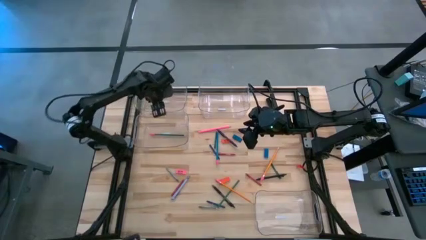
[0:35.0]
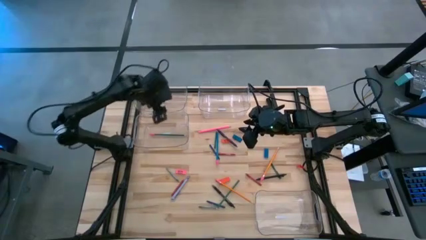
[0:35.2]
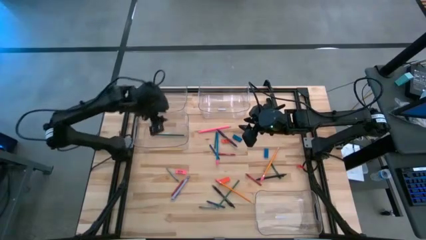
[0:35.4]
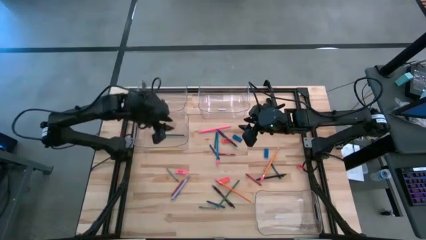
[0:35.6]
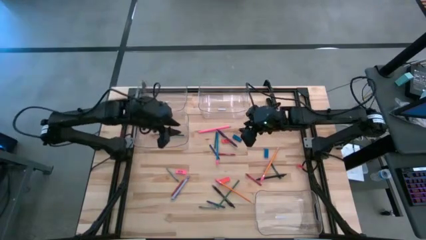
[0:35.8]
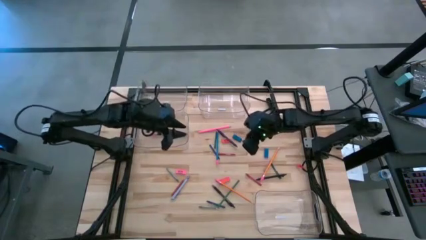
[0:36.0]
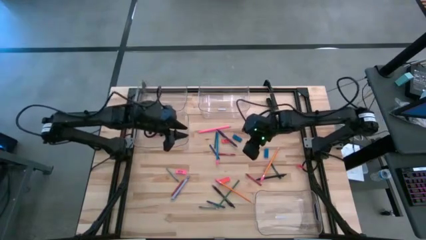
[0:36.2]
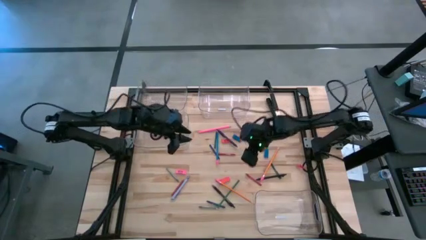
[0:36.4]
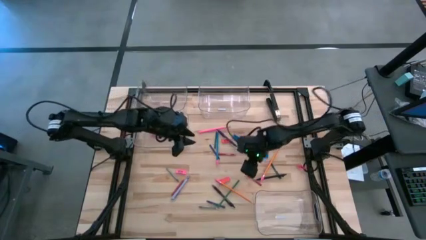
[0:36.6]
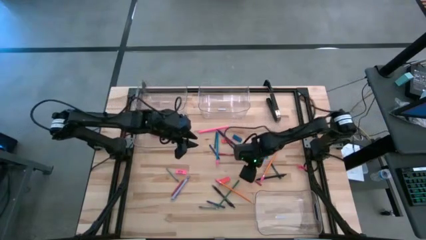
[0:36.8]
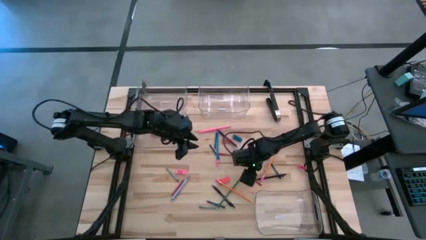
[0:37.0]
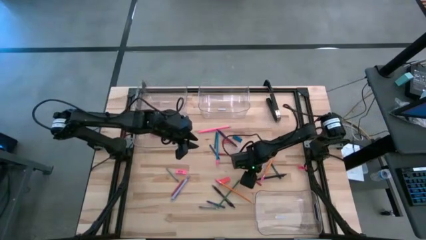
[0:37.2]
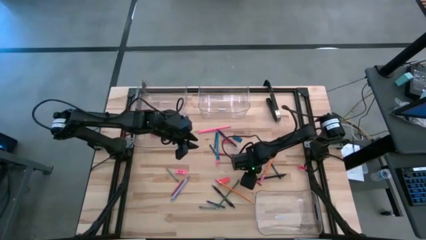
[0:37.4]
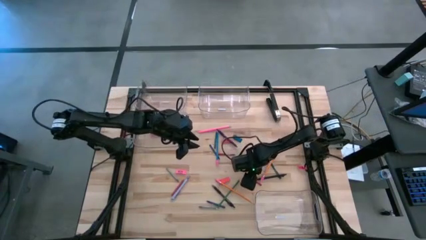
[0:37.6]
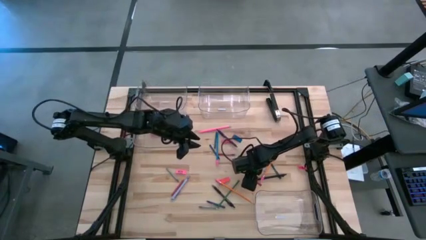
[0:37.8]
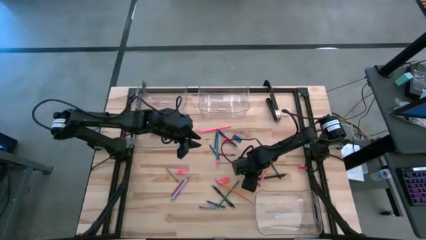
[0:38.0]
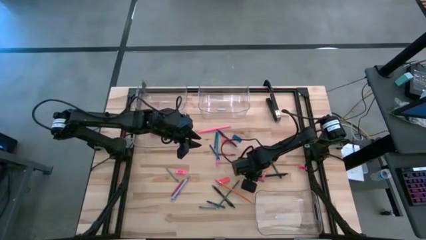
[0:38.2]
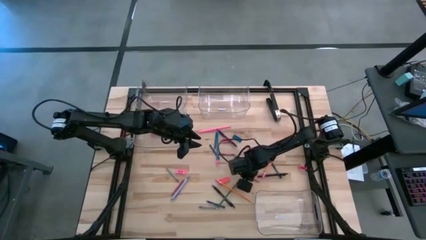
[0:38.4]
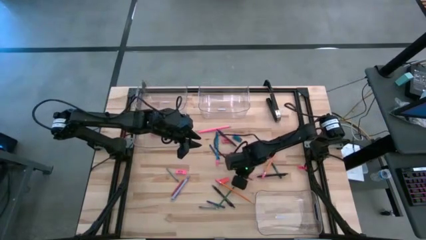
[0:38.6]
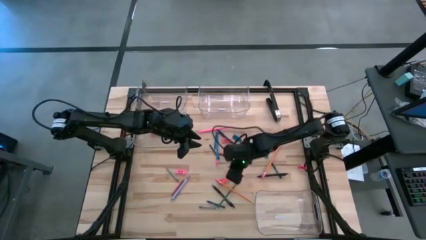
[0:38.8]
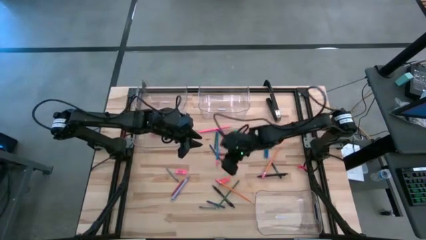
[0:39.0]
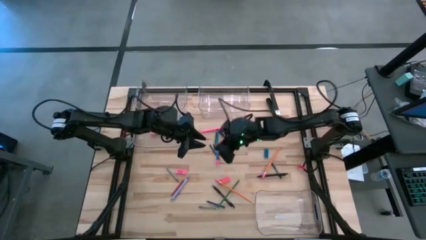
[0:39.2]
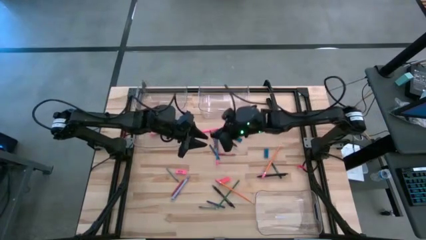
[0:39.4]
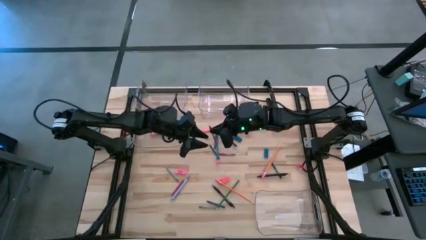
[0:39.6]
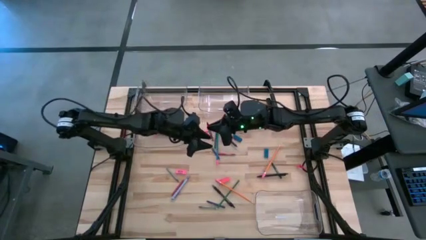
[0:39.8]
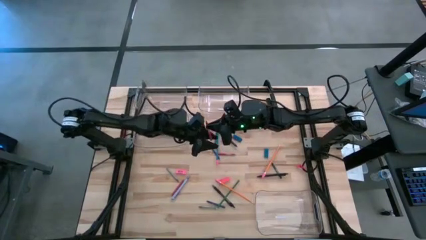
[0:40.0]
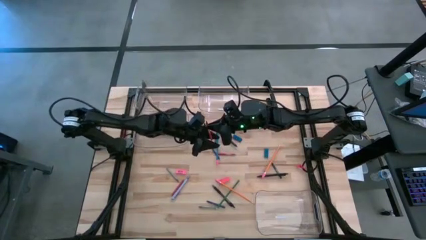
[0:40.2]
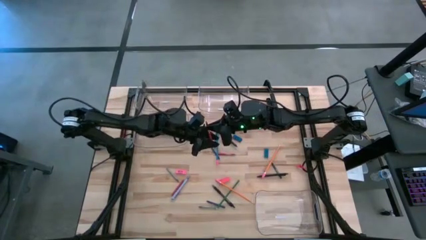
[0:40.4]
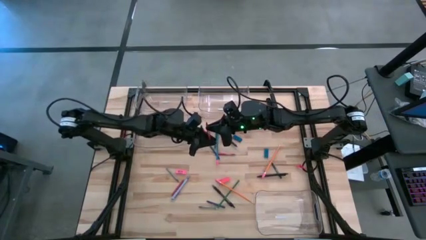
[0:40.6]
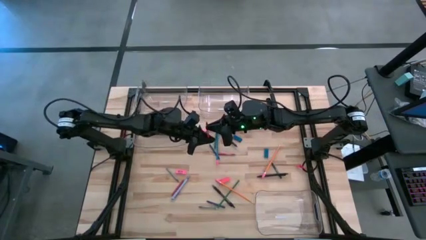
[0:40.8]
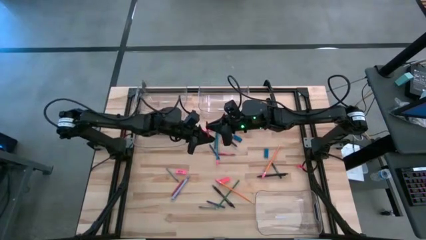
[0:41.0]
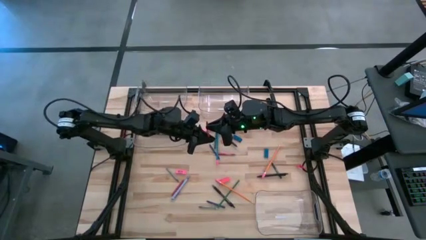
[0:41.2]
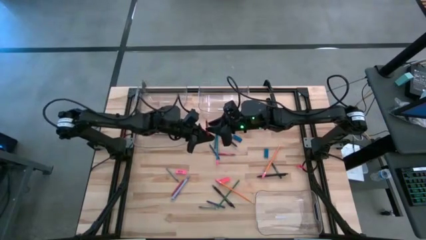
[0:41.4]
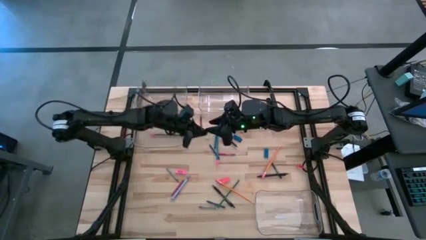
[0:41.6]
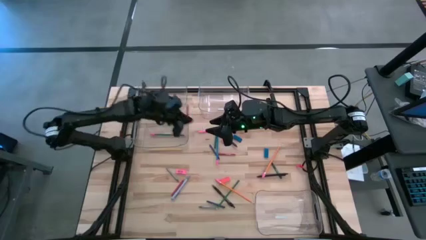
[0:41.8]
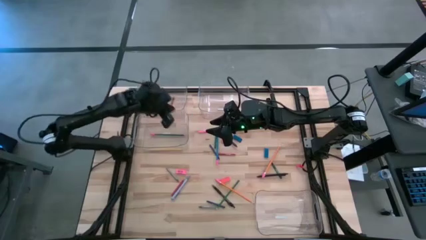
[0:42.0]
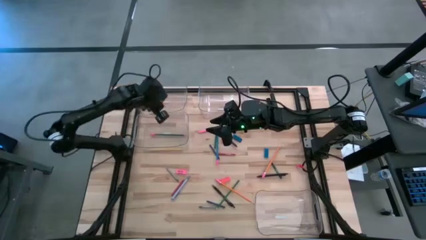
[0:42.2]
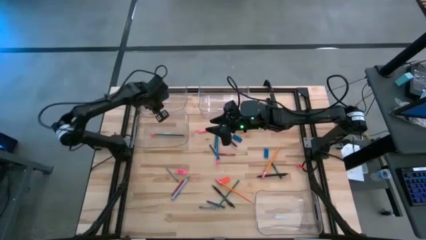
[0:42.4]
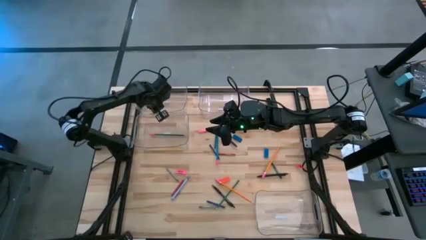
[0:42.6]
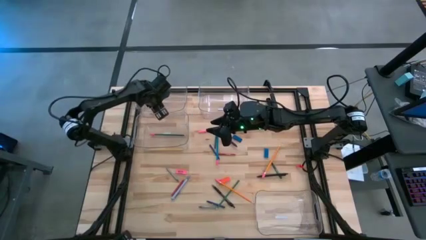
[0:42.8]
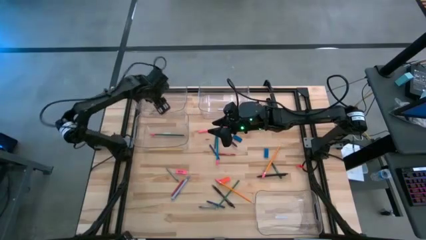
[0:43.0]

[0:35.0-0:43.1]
Task: Sort crayons/erasers/pens/pencils in bins
Put the red crayon into the top left transparent bin

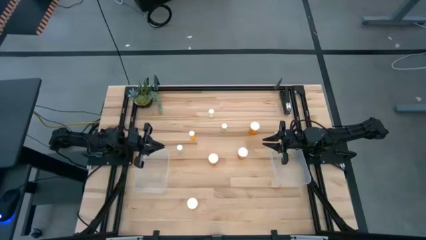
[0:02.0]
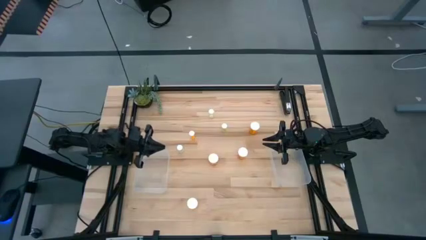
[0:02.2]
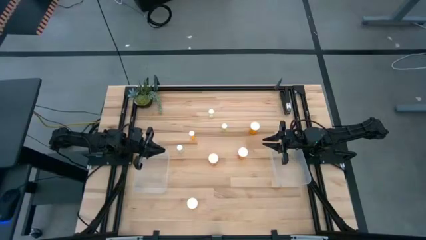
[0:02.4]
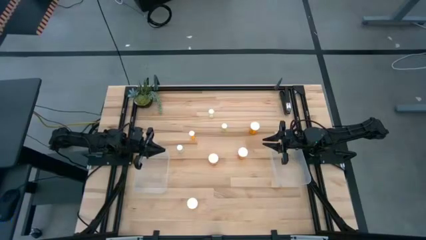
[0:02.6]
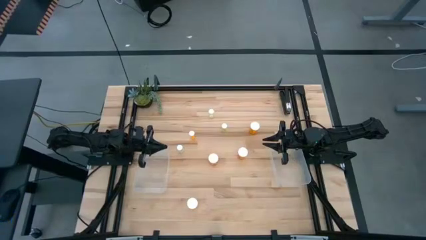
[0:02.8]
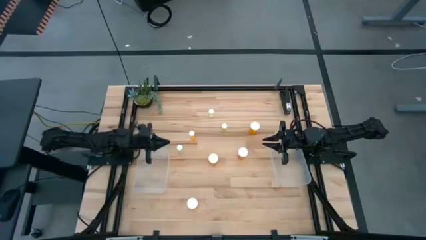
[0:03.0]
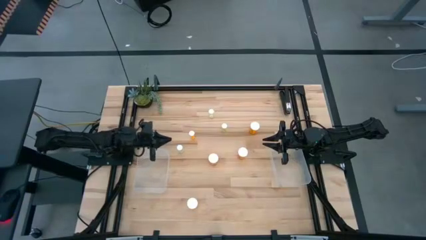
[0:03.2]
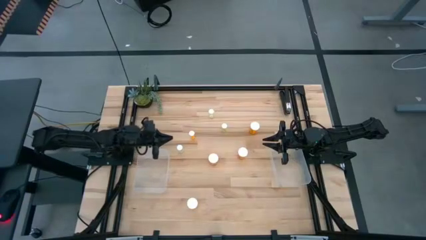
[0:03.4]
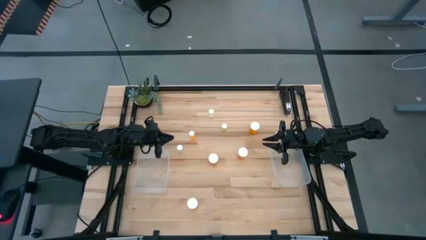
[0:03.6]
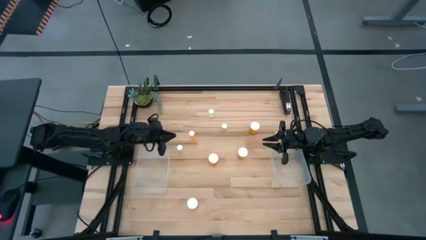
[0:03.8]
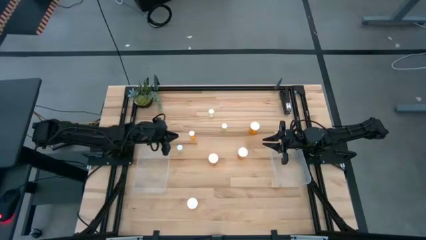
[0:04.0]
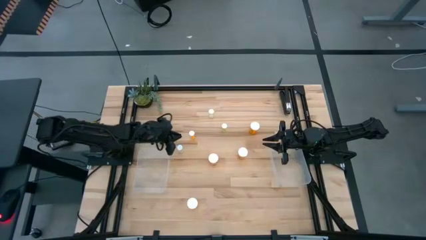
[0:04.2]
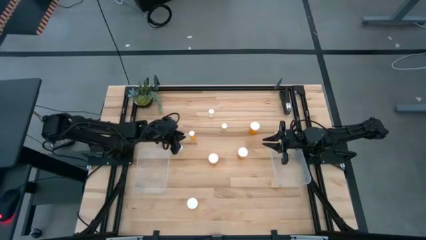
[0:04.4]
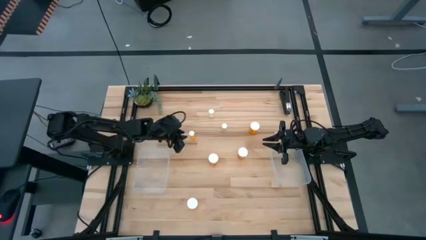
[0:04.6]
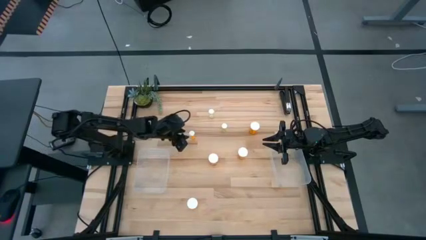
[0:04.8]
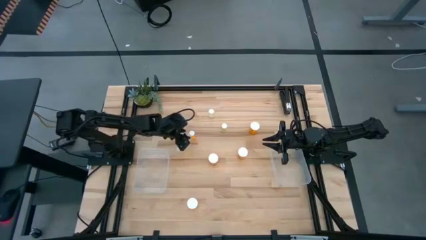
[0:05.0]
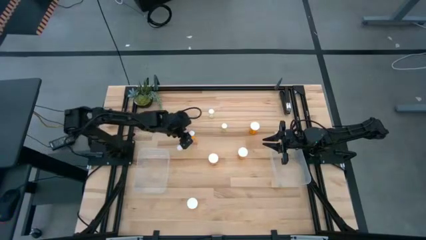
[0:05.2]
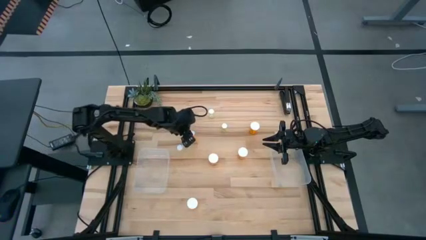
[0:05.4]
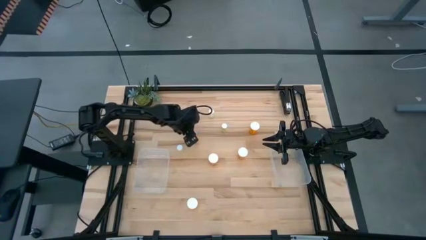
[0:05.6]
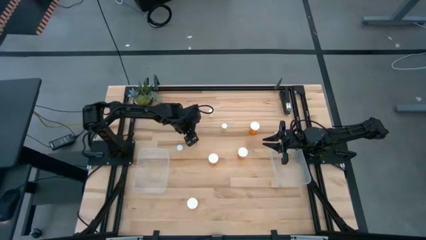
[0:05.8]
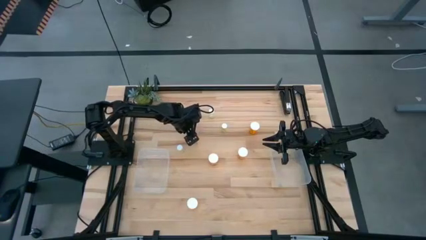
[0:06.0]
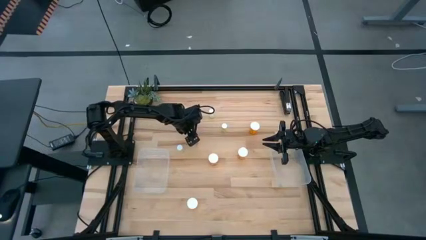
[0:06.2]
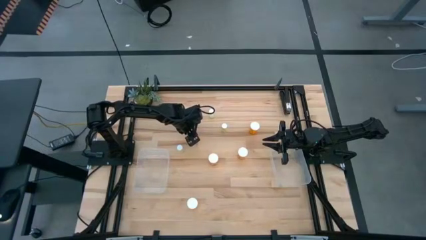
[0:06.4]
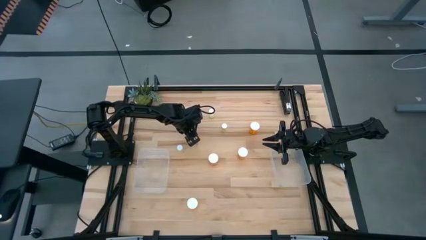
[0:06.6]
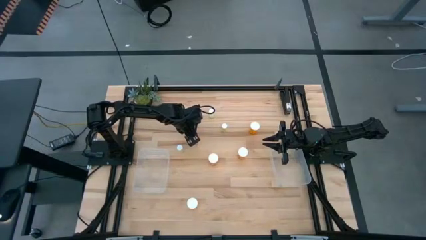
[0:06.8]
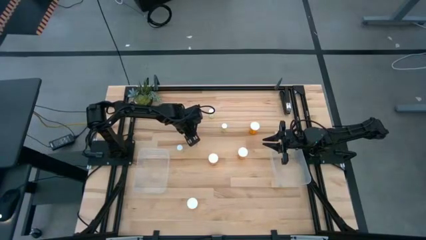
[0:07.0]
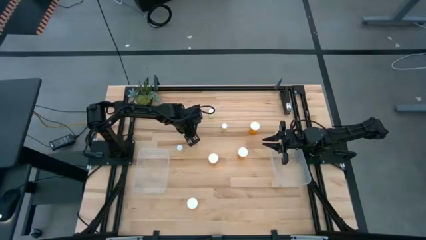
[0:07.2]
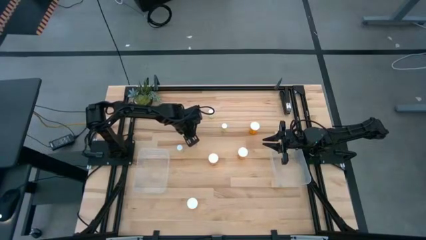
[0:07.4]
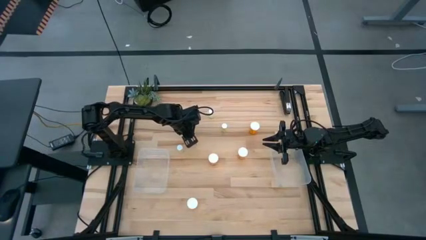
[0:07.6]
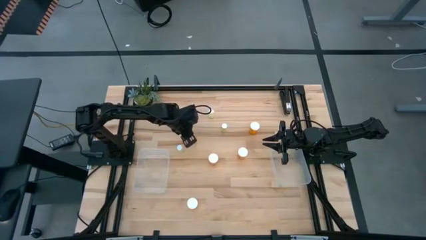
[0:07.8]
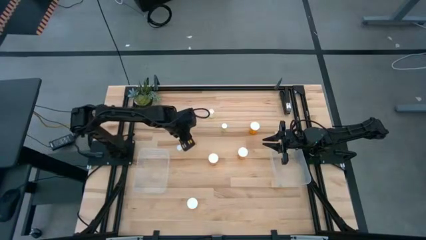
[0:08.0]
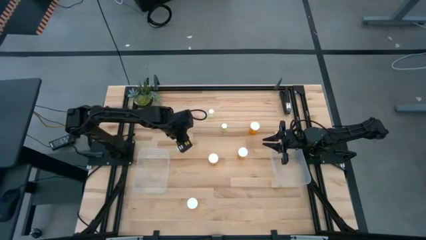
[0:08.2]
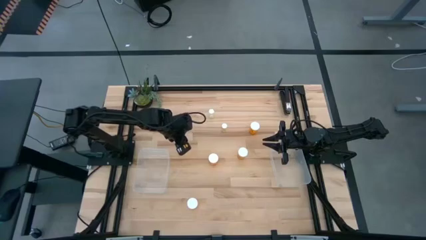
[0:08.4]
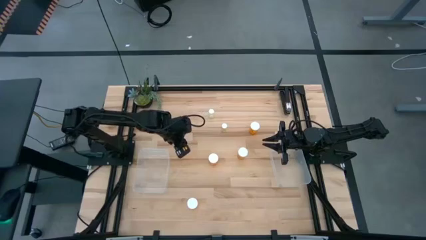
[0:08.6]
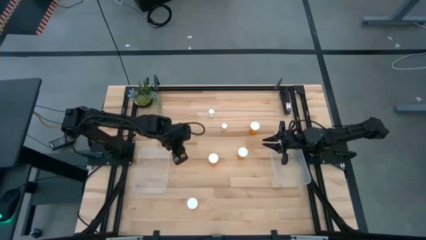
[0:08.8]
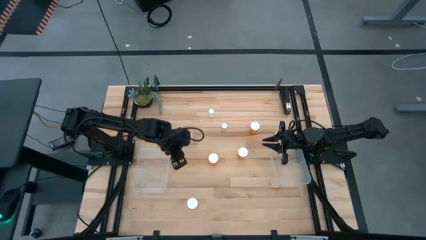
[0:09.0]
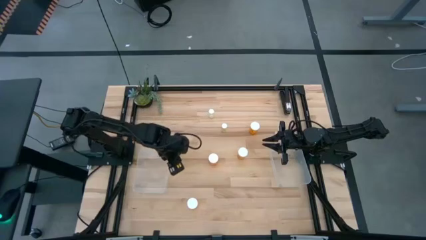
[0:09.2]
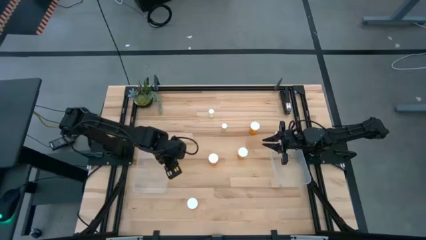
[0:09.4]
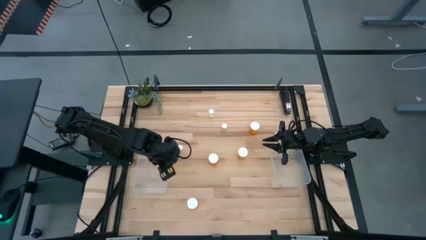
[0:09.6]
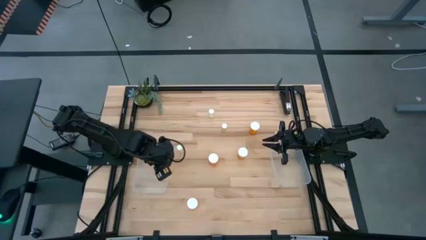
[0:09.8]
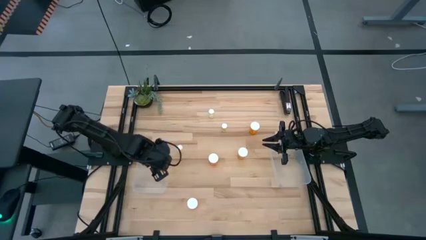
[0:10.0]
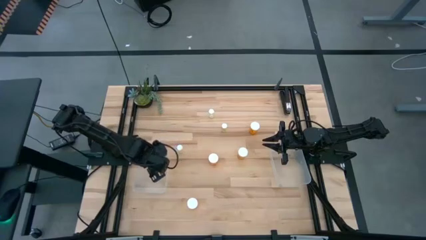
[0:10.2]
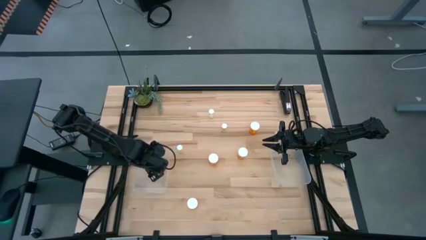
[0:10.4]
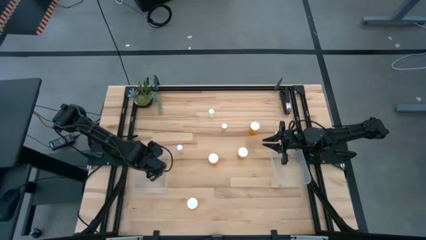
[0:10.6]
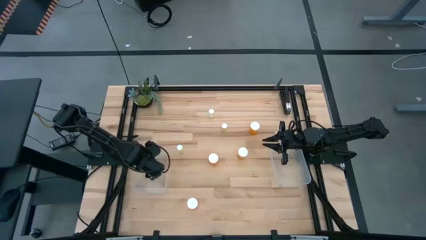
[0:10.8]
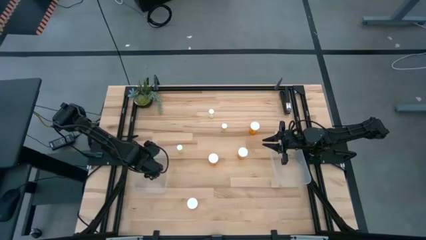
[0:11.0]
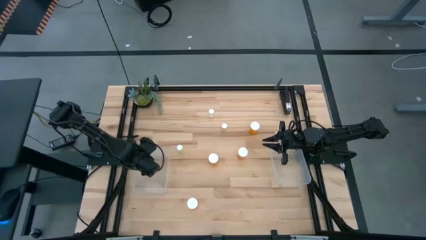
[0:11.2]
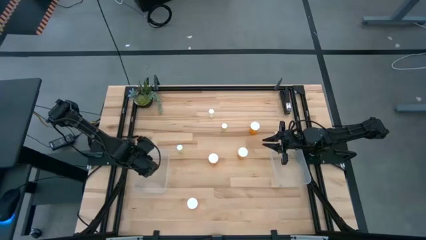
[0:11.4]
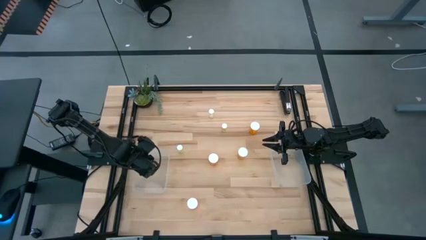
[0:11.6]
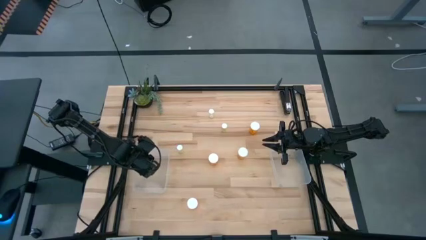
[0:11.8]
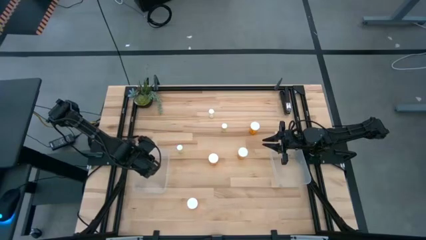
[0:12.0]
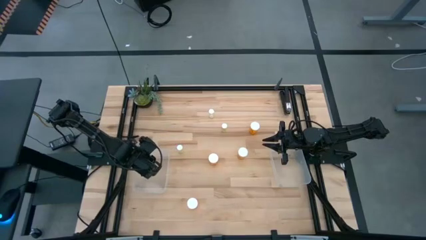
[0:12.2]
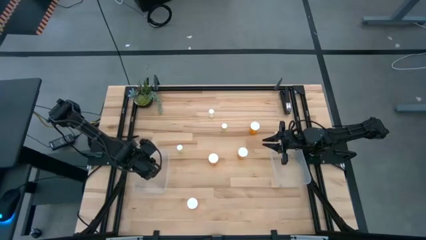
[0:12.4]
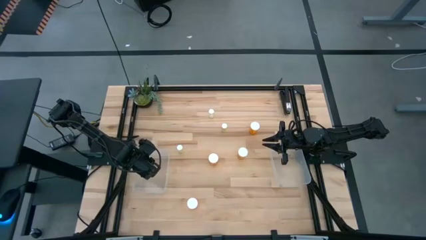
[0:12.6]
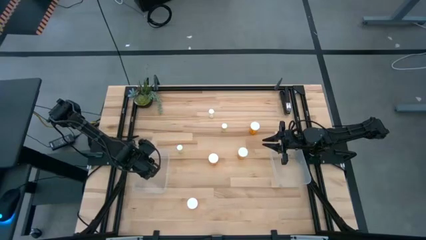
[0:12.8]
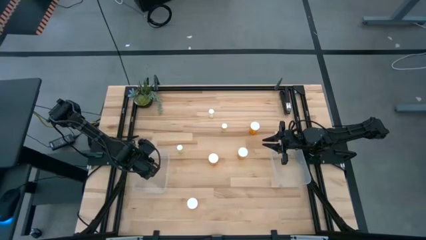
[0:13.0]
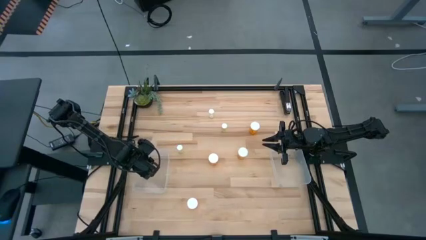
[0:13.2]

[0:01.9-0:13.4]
Task: Pick and place medicine bottles into bin by pill shape (circle, oval)
Put the small orange pill bottle into the left transparent bin
